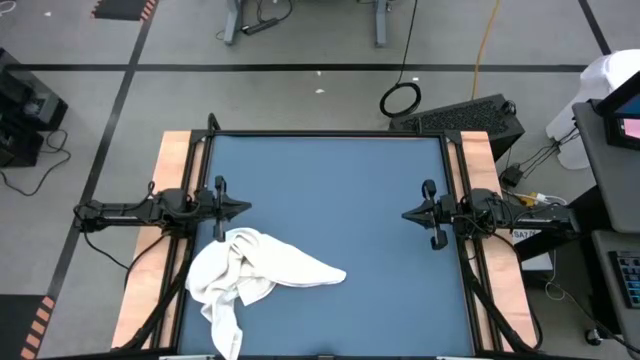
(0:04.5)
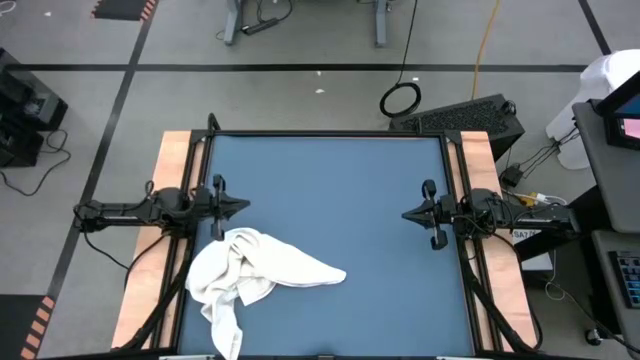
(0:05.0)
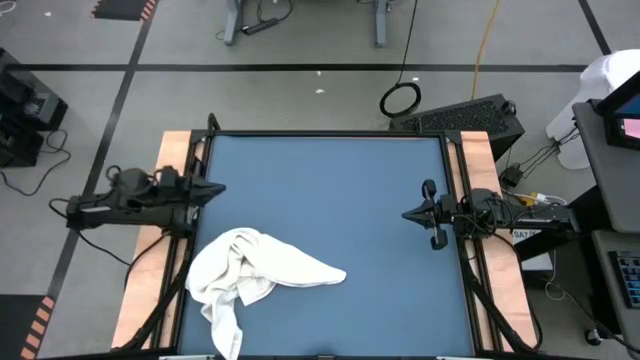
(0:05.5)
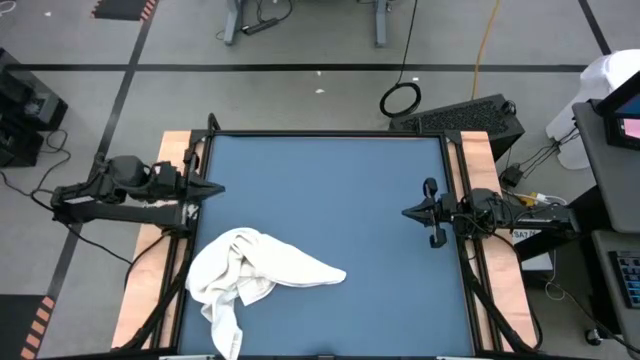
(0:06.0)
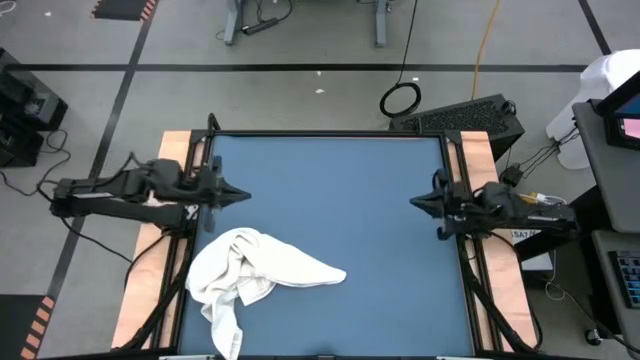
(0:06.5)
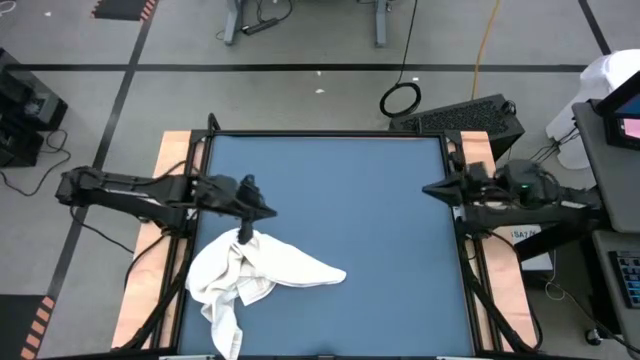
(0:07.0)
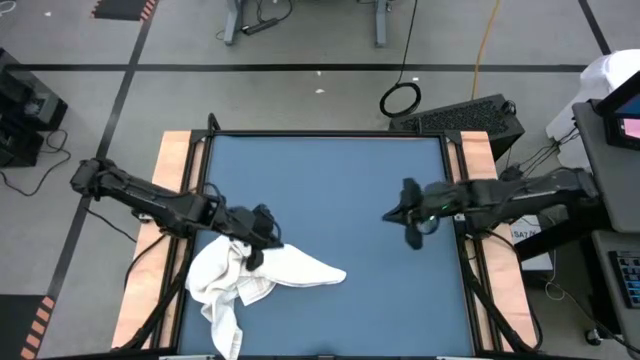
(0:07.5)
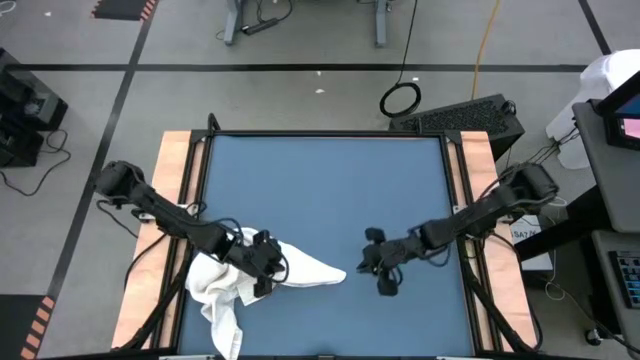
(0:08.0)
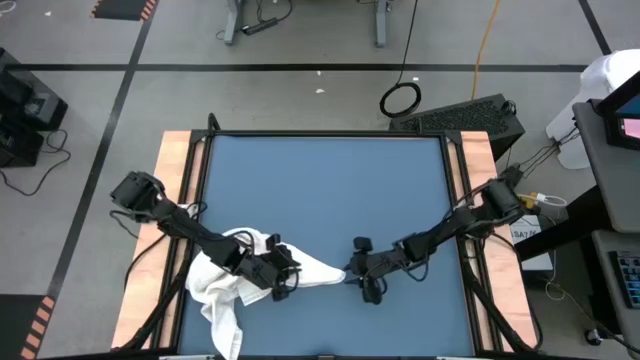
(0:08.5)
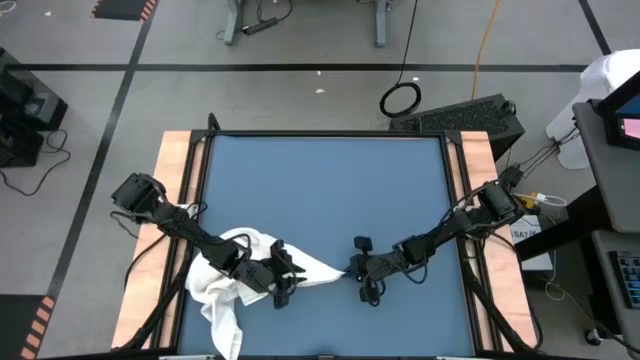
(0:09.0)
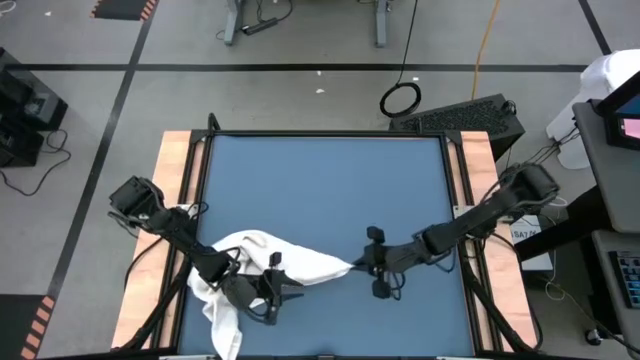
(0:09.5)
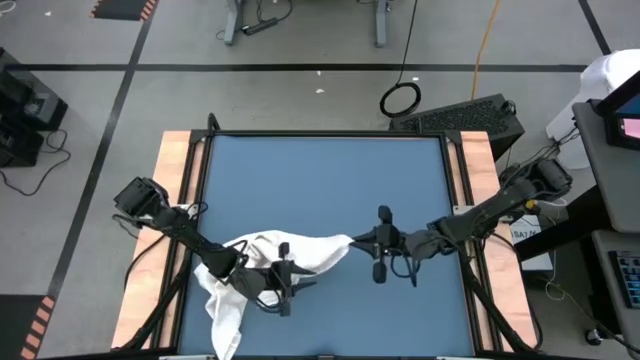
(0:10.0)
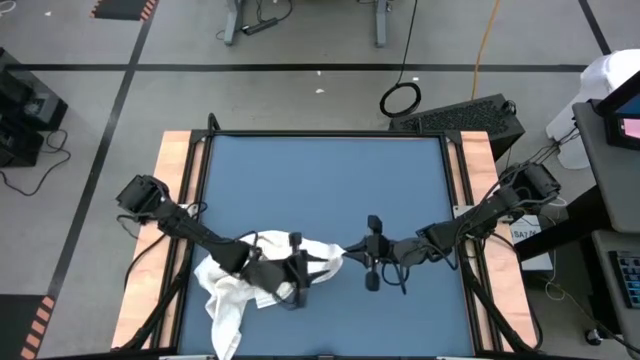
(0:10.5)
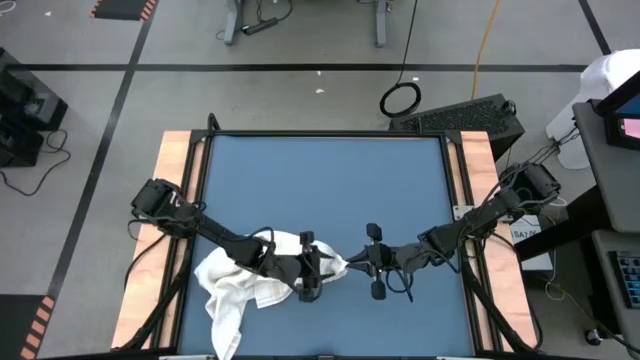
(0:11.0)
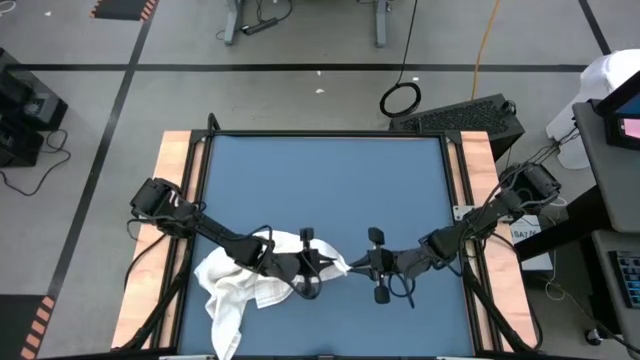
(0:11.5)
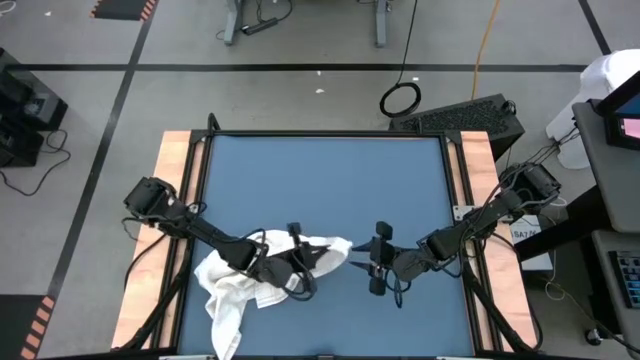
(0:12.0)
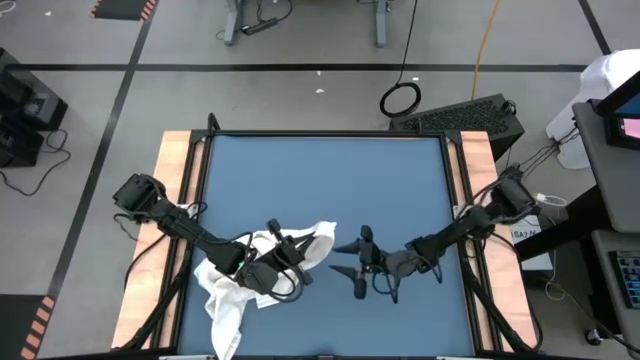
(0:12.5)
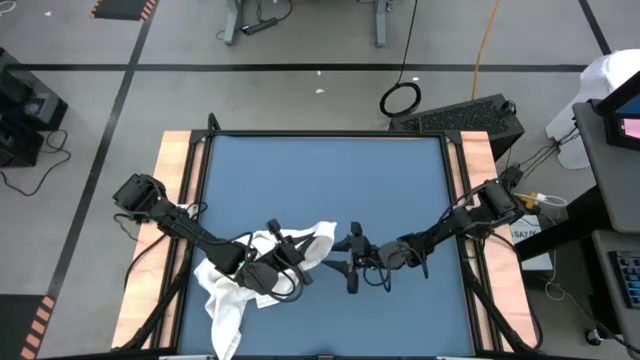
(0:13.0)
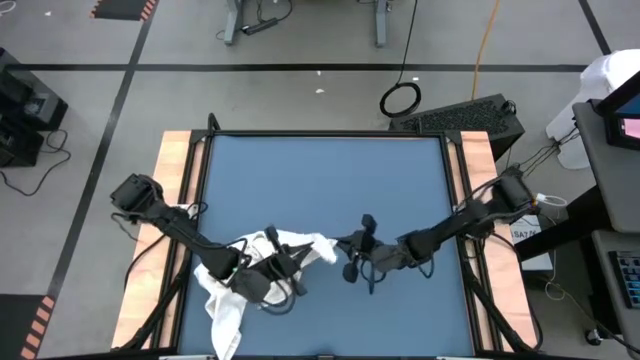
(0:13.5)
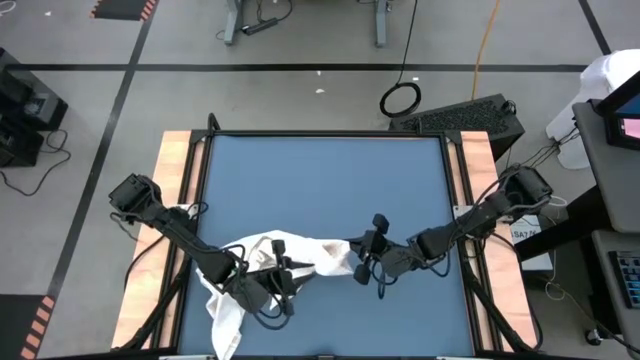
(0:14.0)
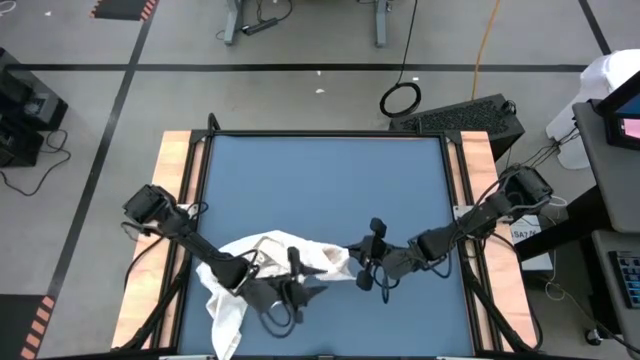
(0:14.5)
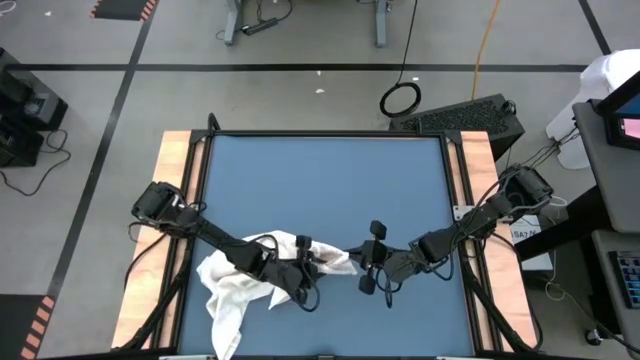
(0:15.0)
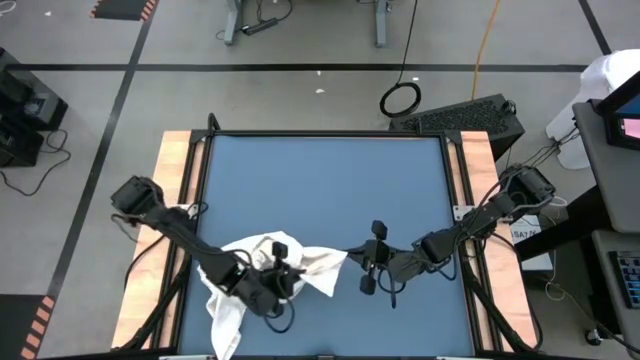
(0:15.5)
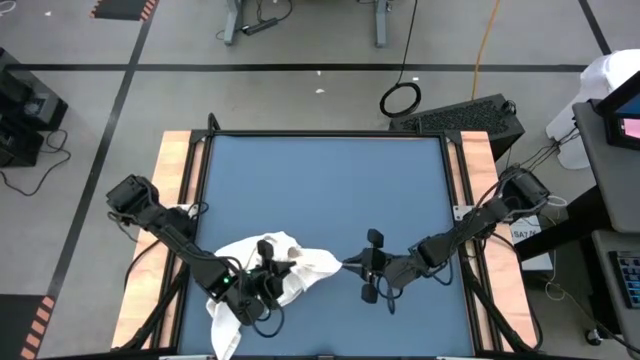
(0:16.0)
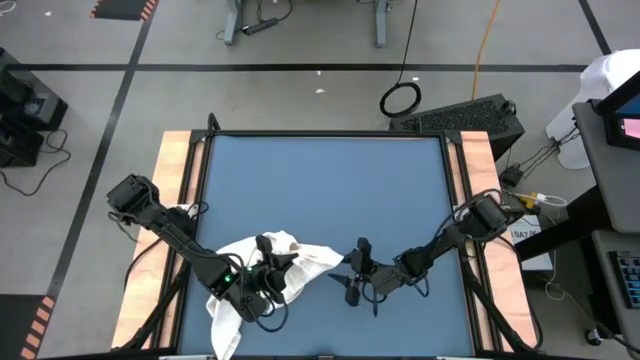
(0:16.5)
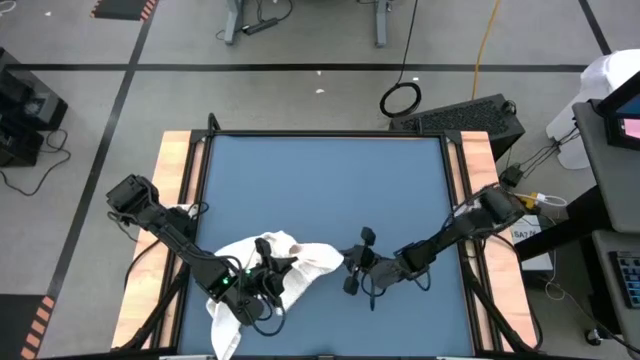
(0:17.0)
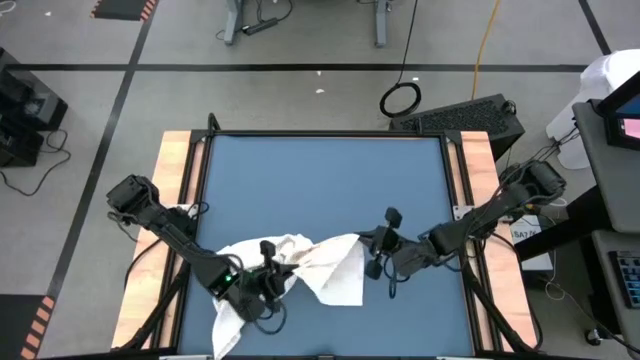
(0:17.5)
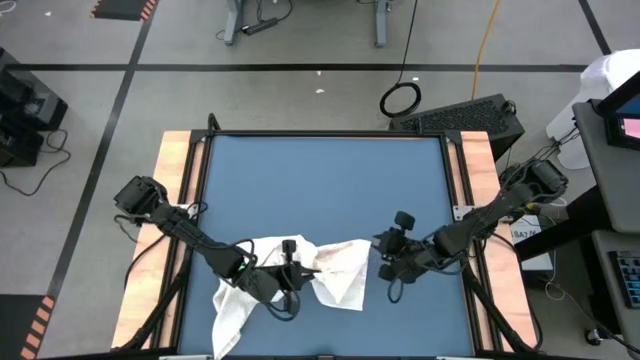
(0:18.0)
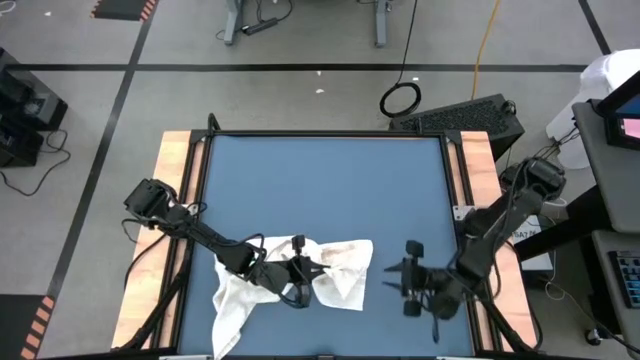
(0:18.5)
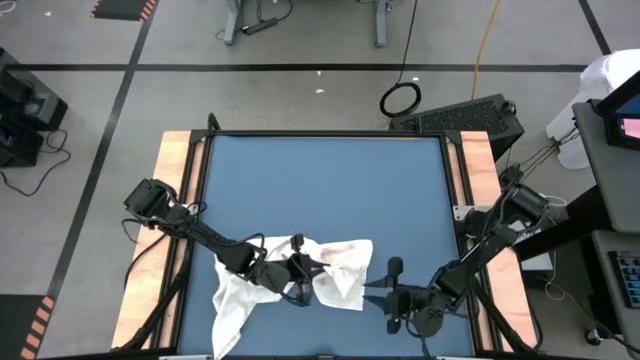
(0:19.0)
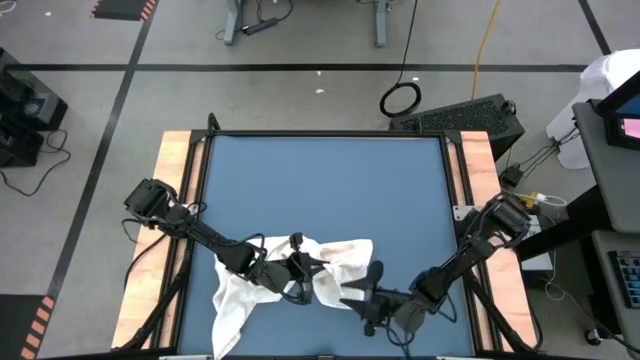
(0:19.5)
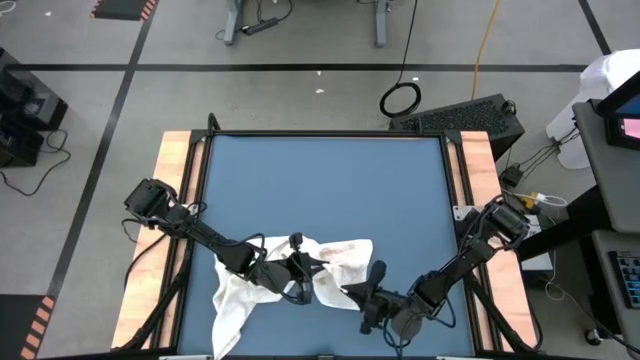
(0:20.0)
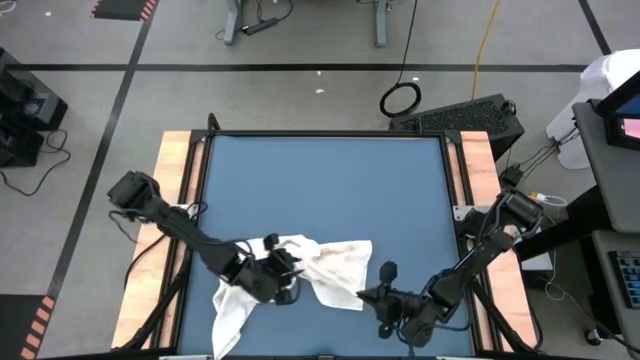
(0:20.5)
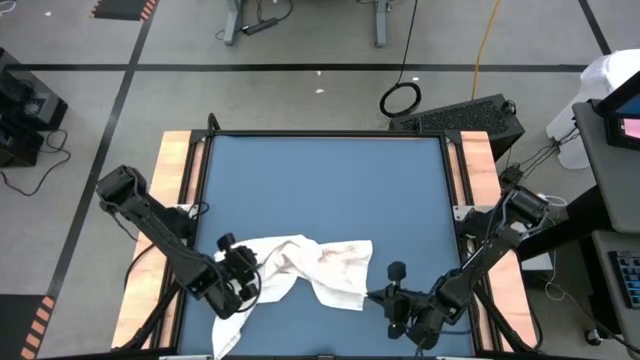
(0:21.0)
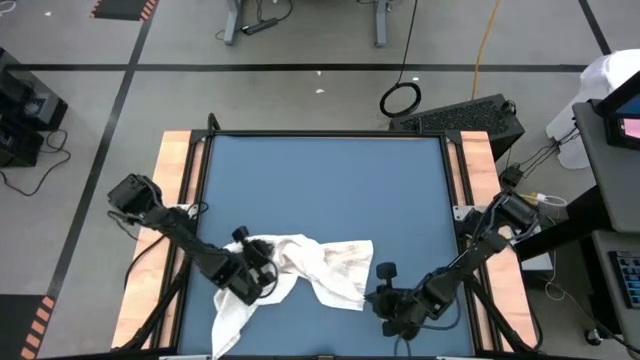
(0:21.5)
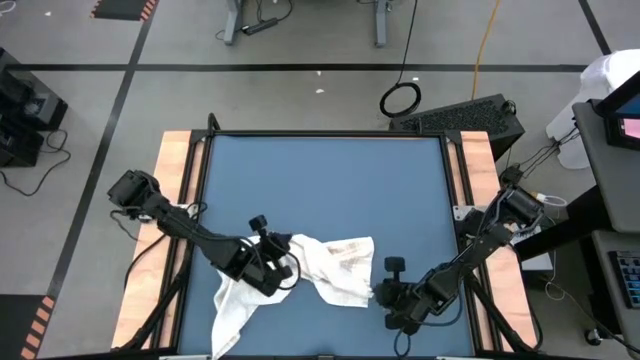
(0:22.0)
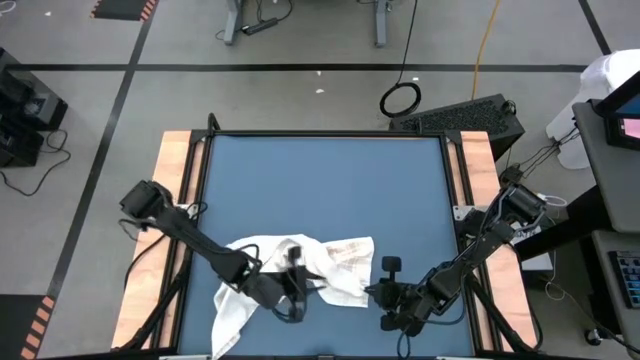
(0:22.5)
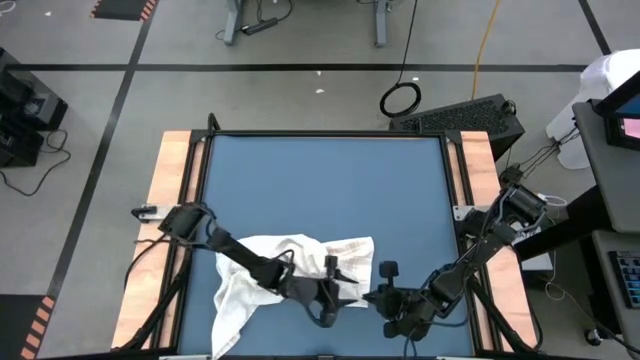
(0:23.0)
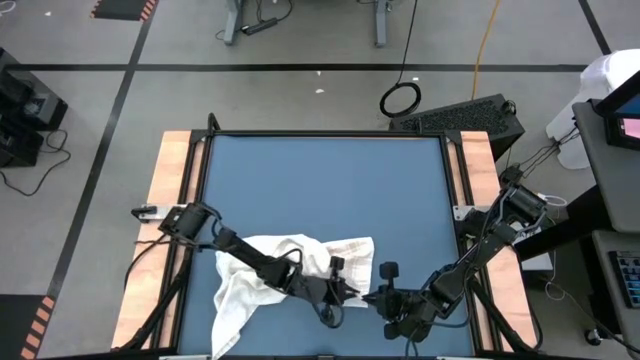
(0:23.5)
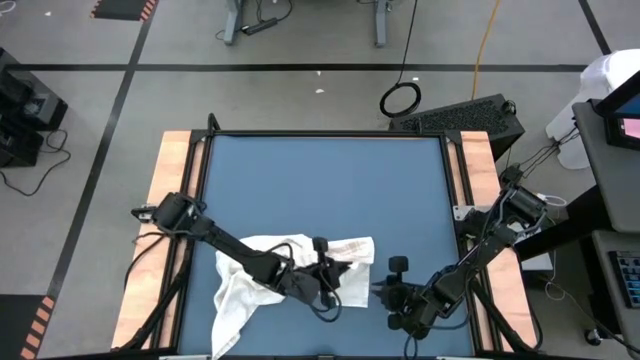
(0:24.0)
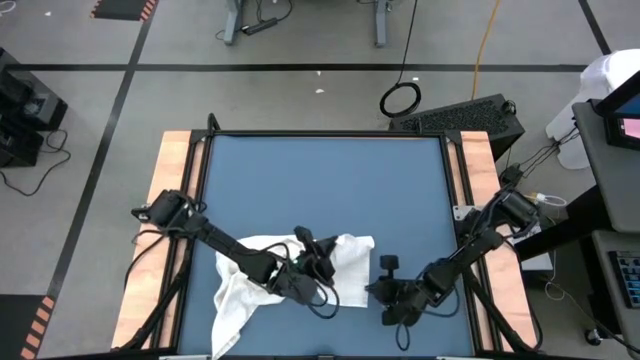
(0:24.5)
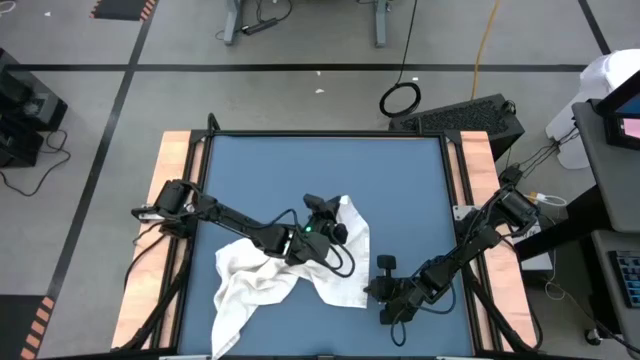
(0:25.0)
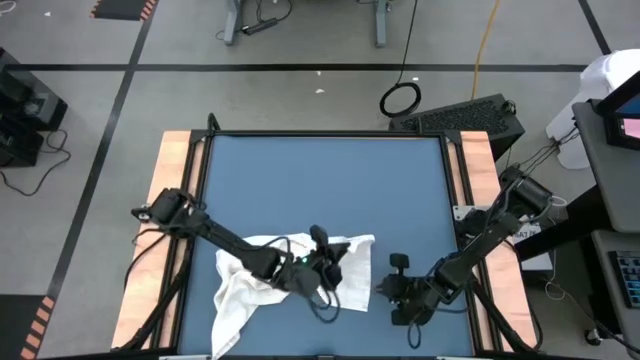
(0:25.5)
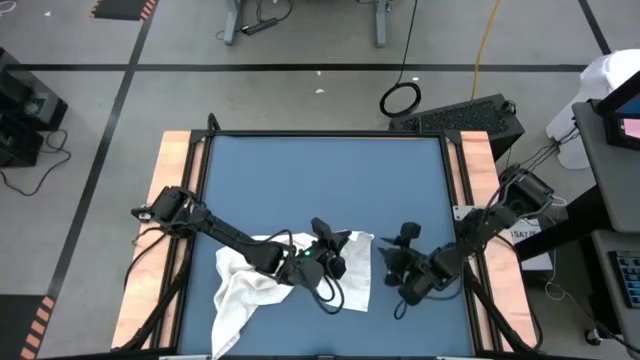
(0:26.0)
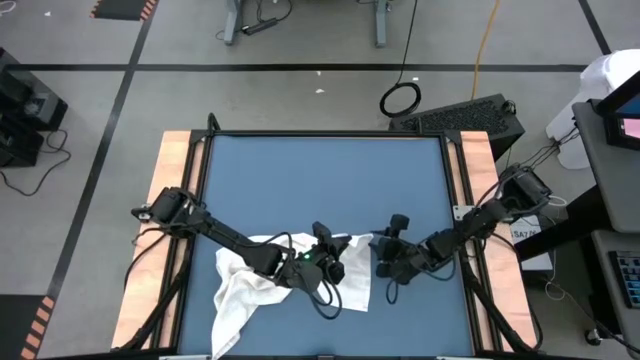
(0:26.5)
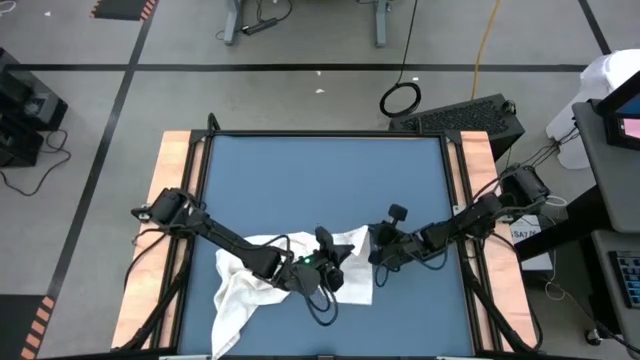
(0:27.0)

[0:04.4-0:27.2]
Task: Roll towel into tight, uniform cylinder
Roll the white towel
